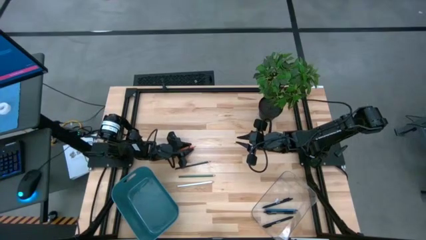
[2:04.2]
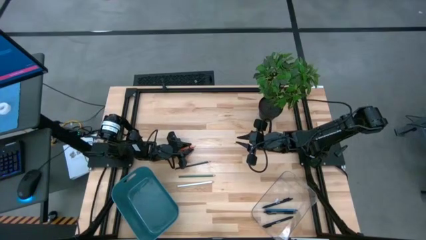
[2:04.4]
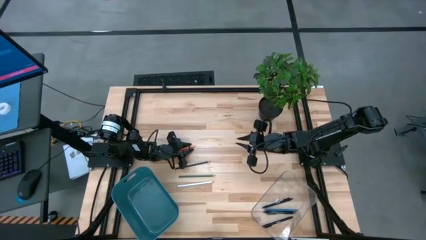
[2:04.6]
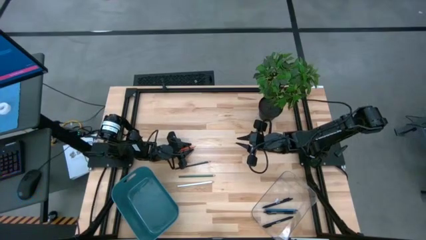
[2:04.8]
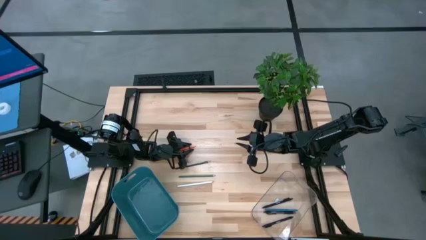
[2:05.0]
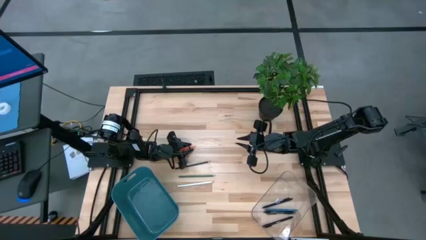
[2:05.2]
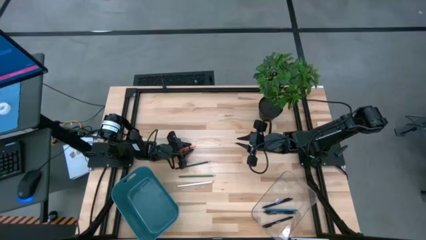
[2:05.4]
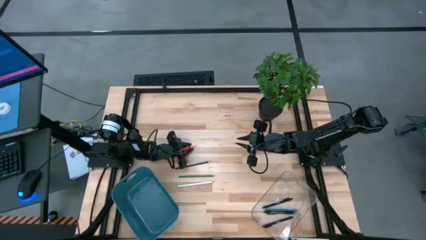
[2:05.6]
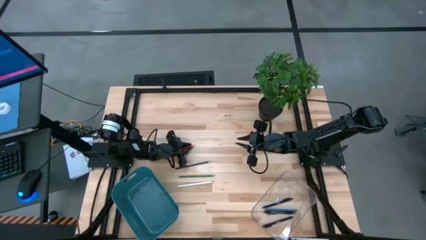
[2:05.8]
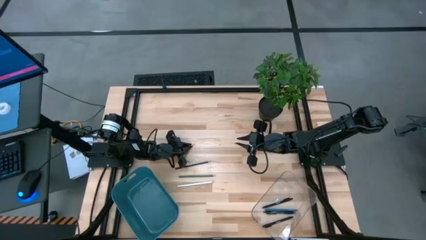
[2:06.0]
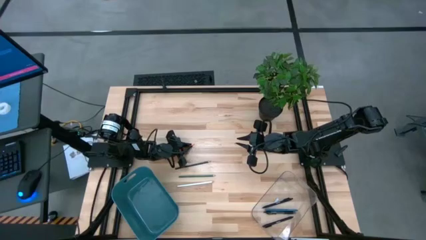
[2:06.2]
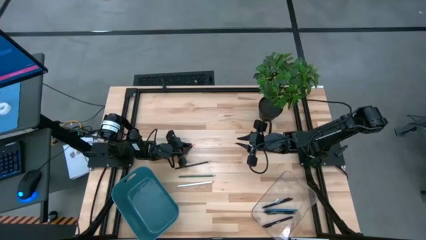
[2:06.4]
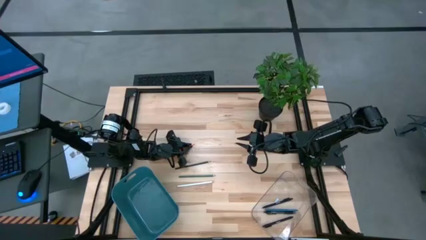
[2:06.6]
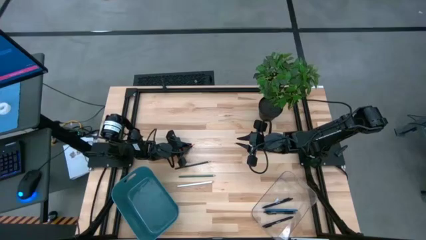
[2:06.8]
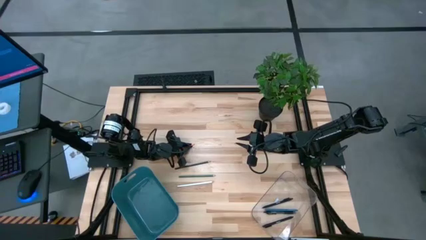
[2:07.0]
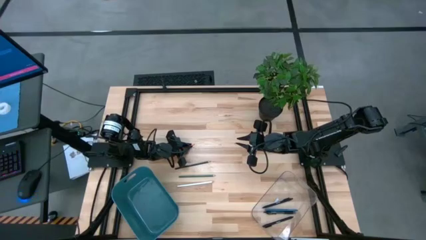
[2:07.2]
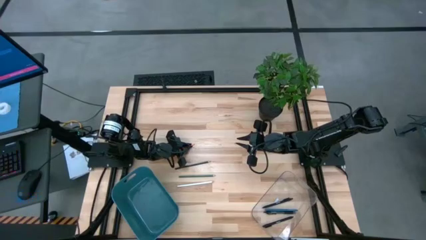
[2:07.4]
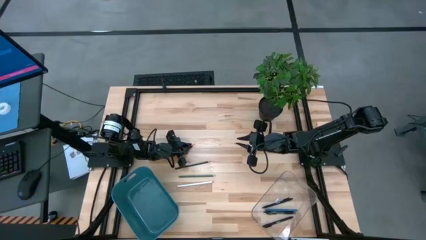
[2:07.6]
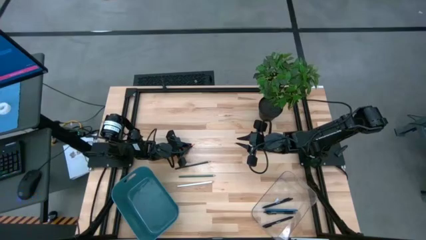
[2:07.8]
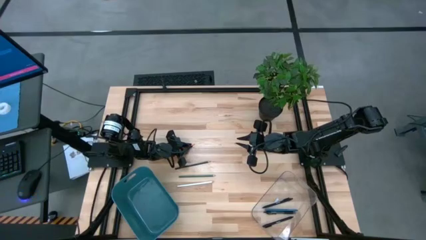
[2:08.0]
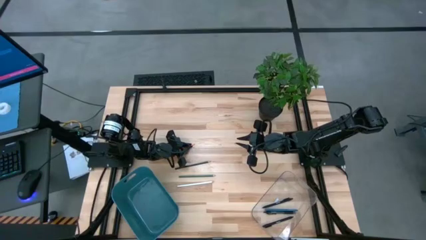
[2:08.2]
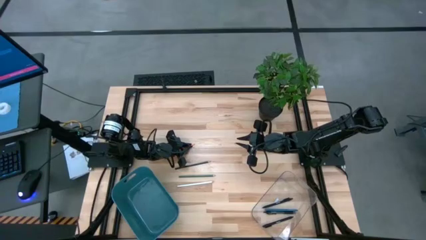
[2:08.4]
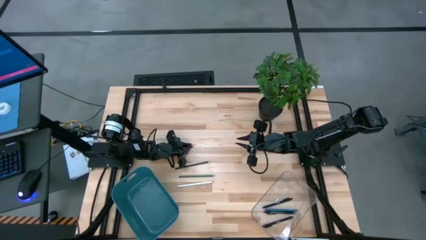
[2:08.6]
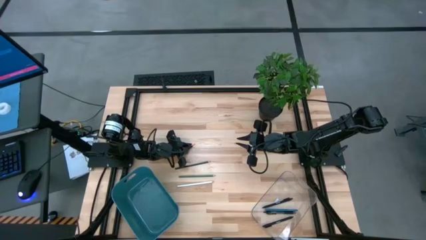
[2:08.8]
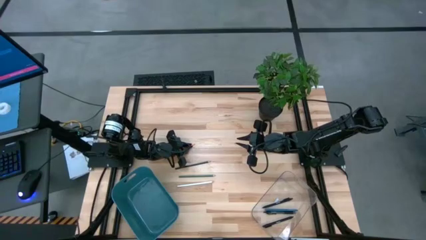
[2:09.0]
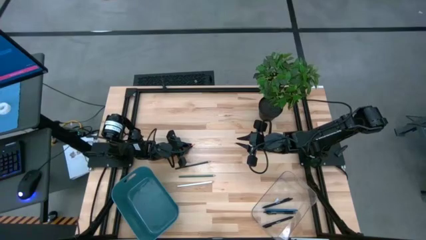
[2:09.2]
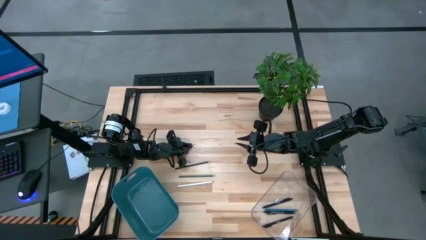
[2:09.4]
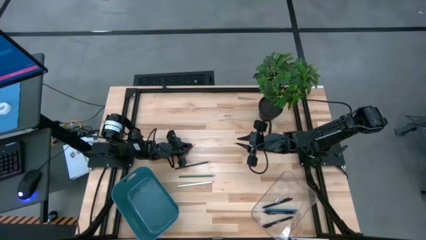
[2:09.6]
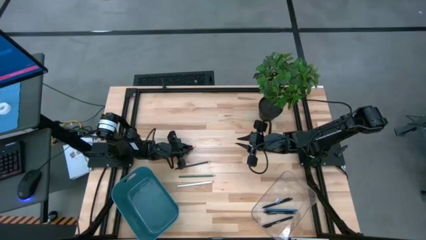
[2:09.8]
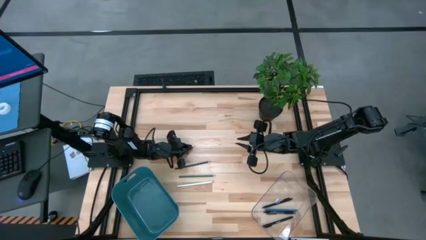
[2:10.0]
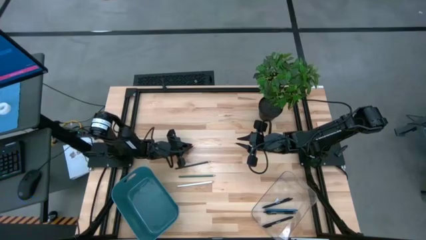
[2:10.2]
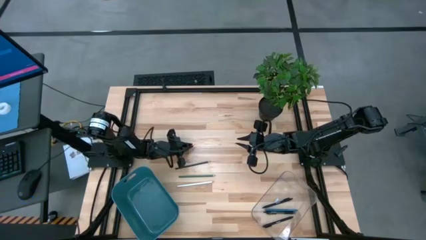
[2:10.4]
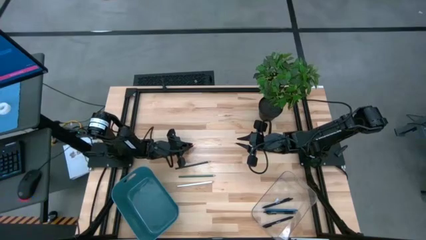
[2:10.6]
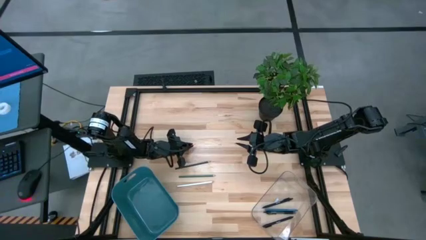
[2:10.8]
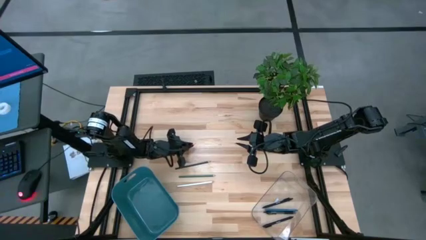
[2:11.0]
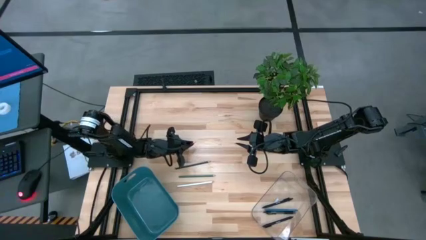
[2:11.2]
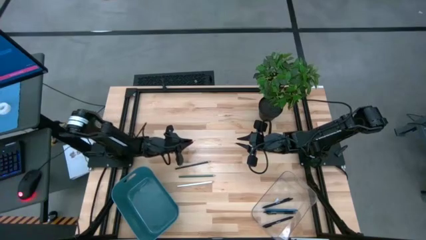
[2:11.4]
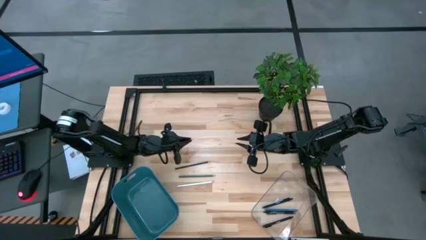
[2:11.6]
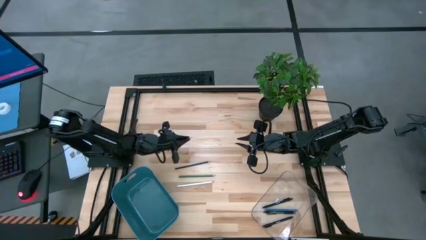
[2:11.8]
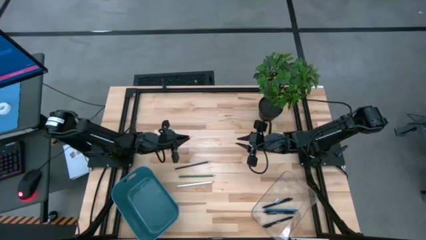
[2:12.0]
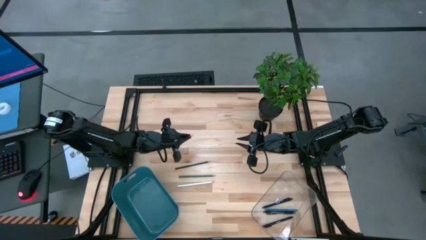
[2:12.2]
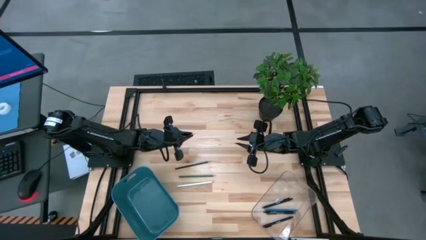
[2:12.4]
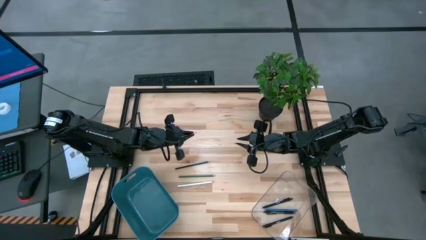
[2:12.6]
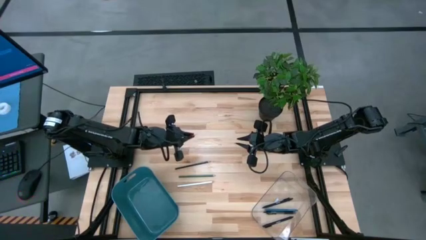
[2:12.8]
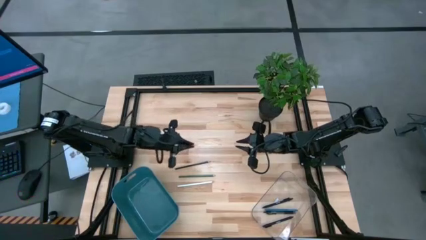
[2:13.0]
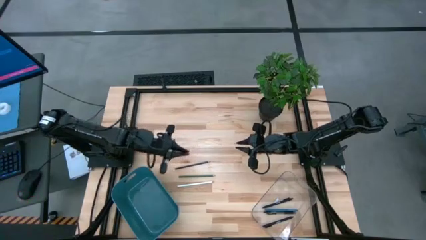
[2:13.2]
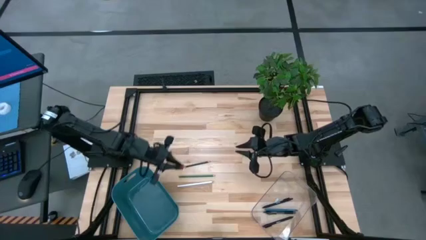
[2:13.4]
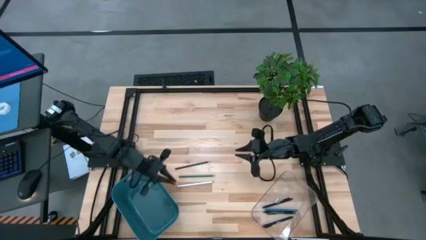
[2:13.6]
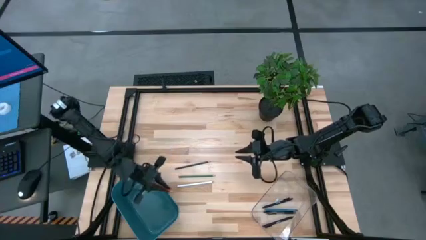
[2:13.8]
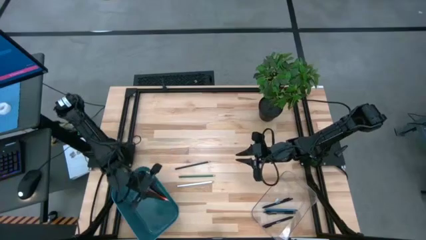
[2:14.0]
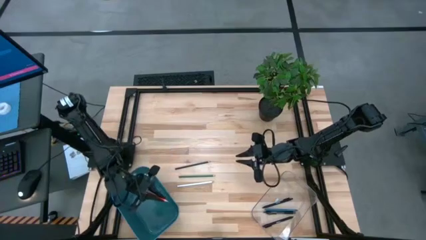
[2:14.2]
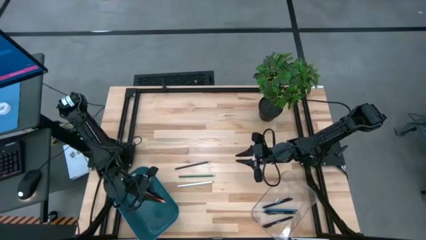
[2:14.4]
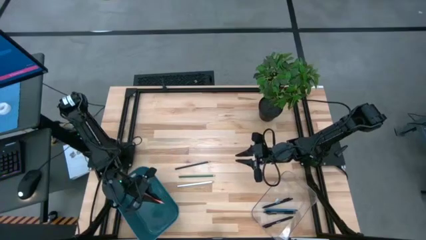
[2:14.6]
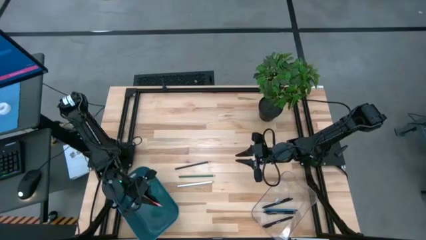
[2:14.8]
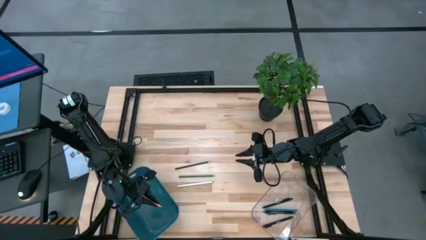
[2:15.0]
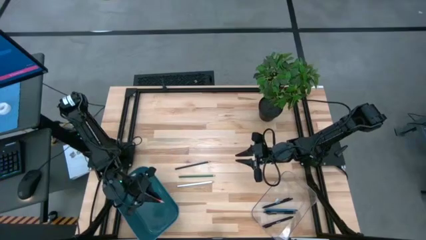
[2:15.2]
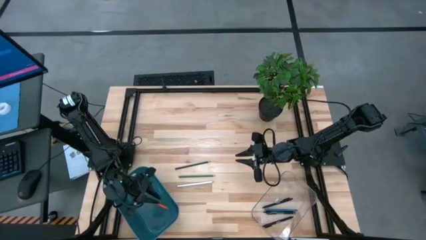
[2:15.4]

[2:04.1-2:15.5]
Task: Sort pens & pencils
Put the orange pencil in the blue bin
